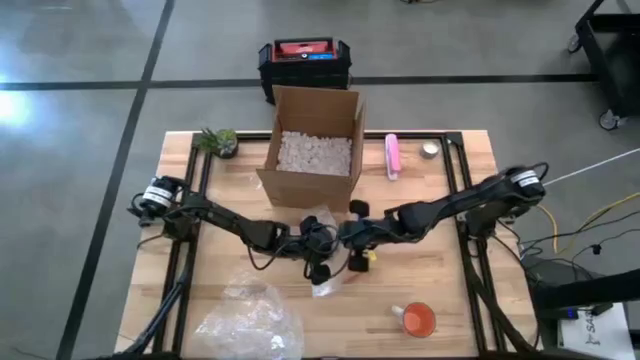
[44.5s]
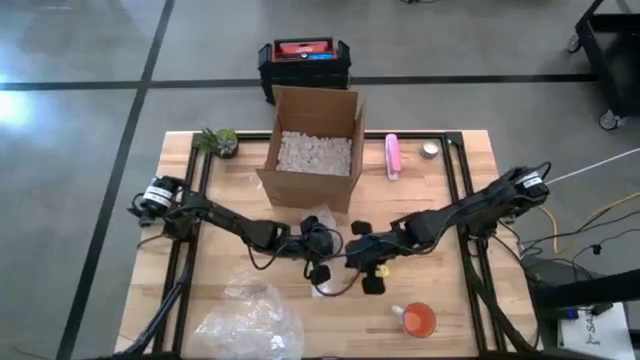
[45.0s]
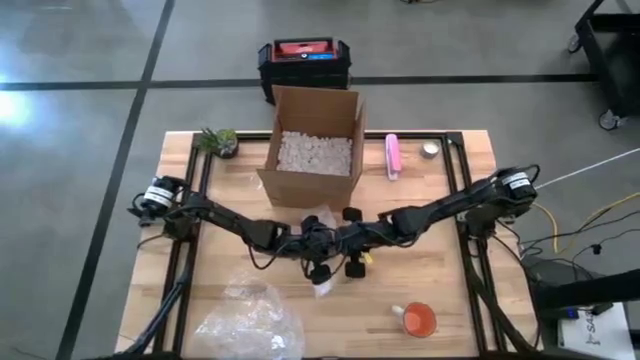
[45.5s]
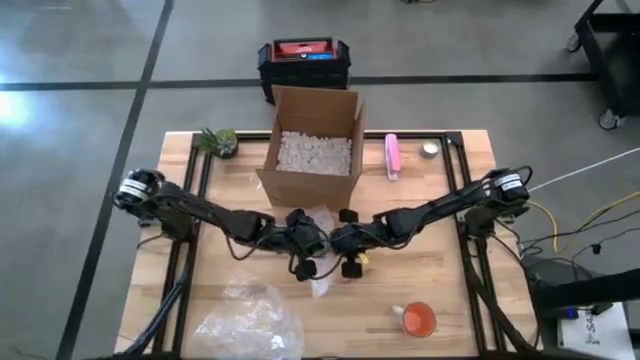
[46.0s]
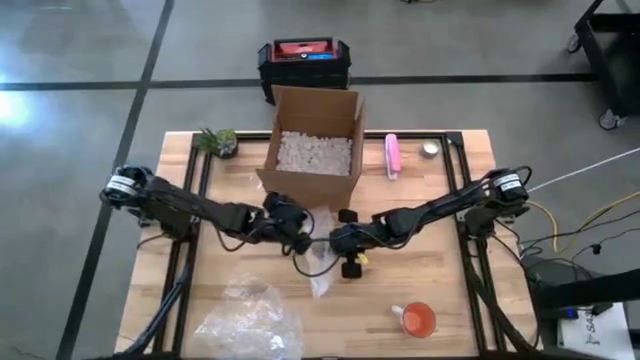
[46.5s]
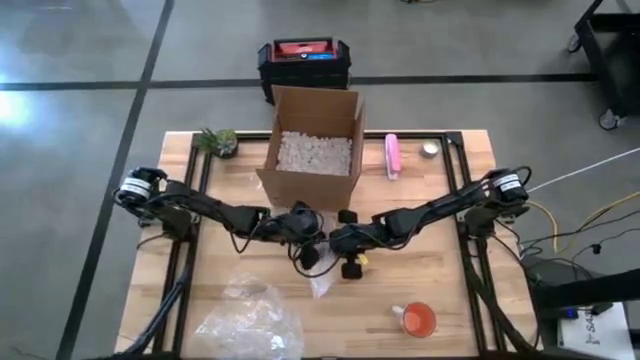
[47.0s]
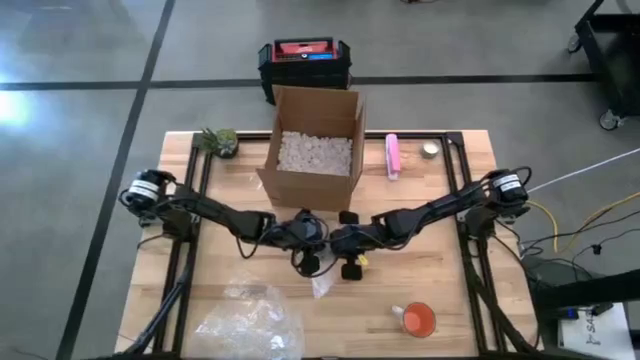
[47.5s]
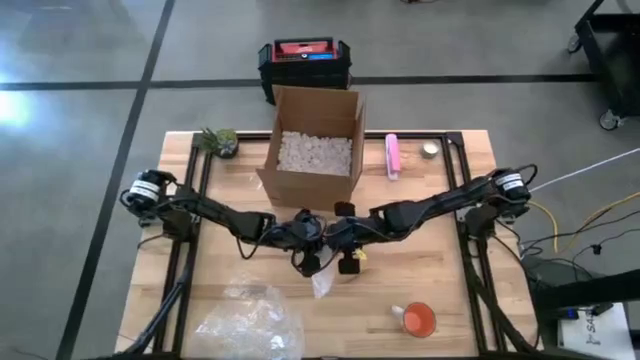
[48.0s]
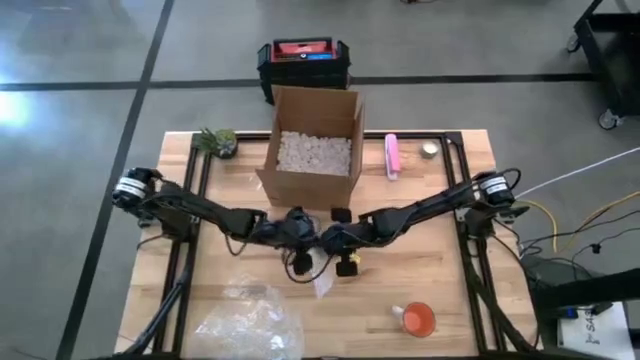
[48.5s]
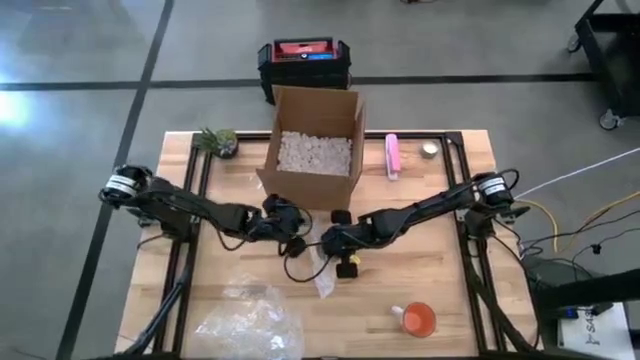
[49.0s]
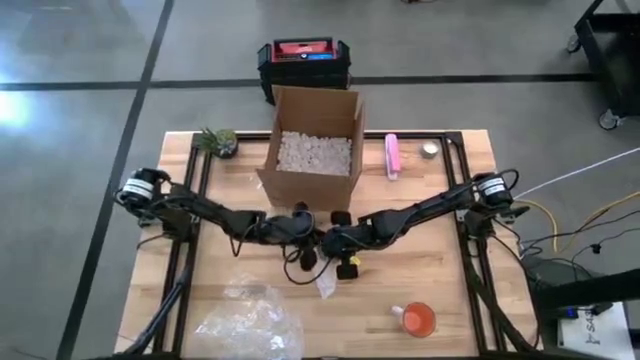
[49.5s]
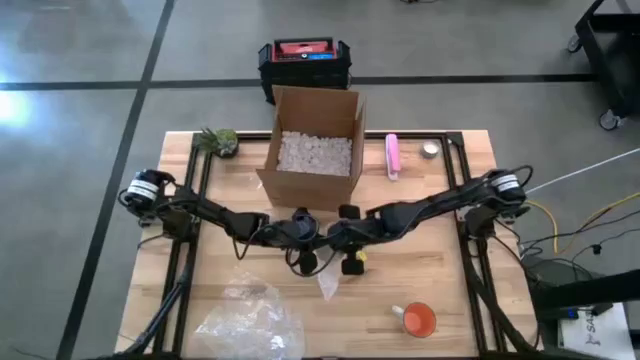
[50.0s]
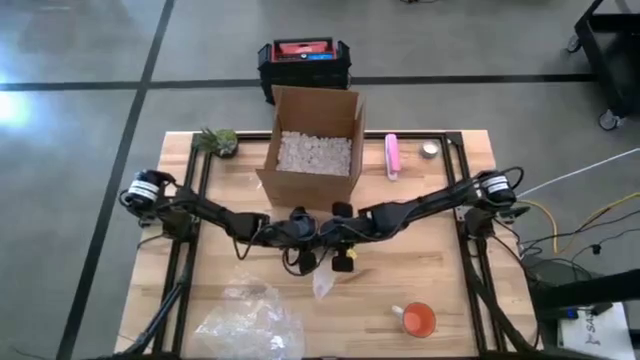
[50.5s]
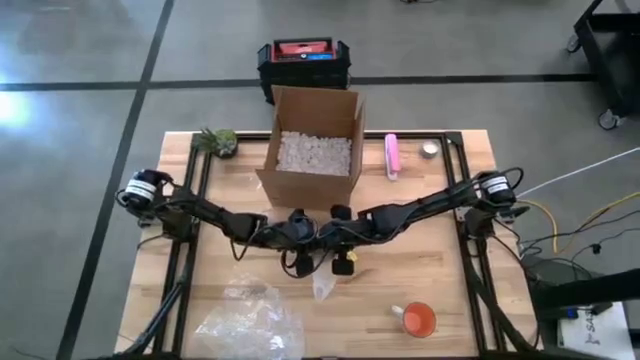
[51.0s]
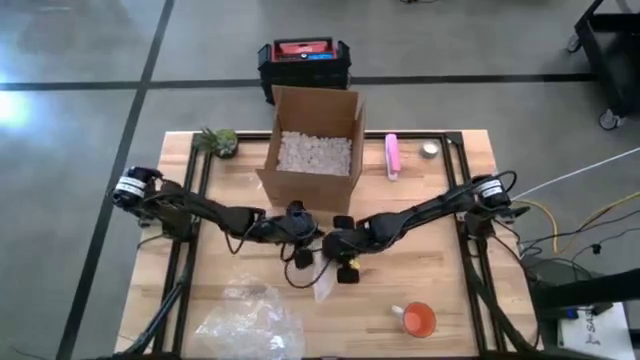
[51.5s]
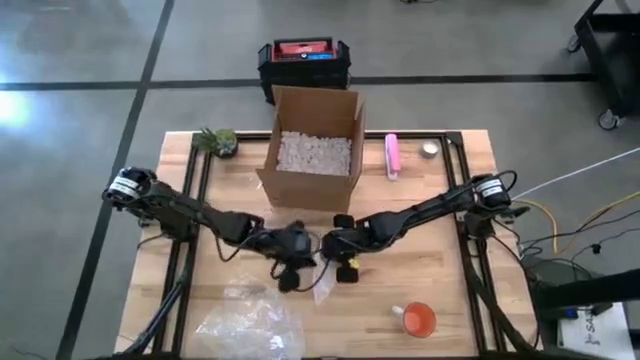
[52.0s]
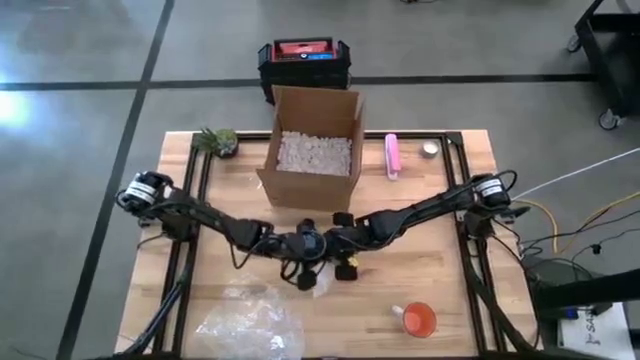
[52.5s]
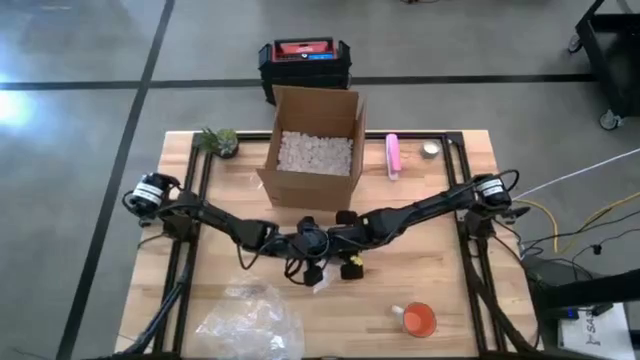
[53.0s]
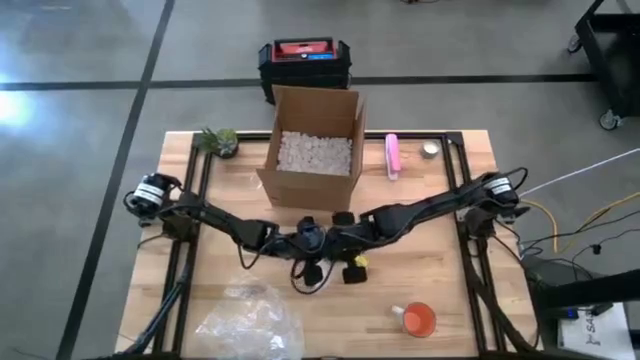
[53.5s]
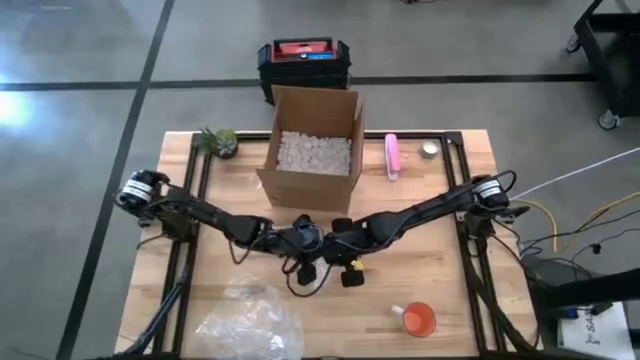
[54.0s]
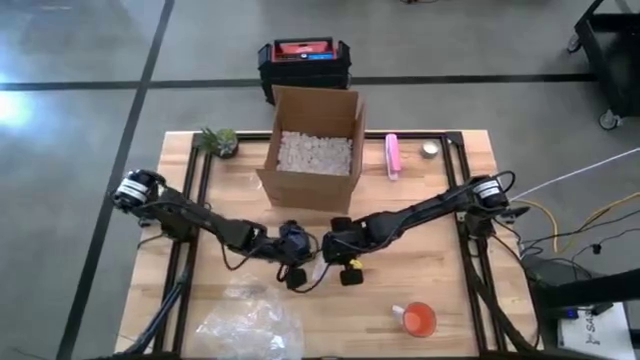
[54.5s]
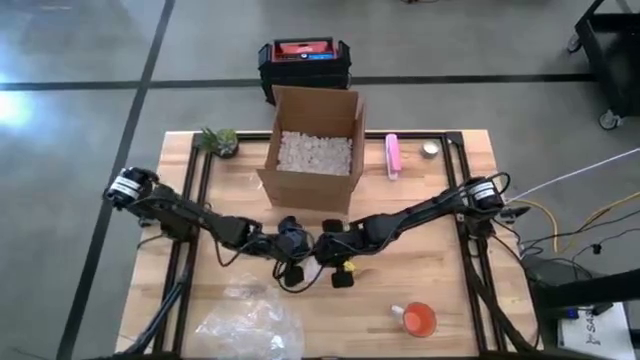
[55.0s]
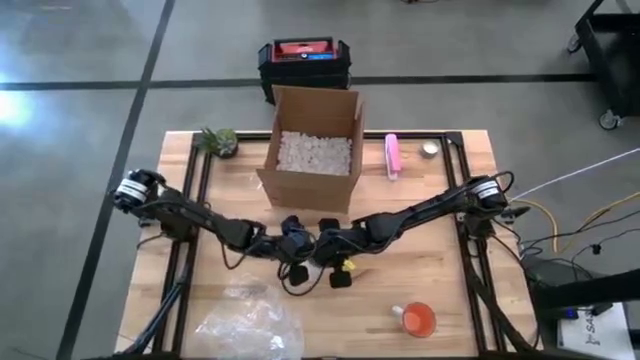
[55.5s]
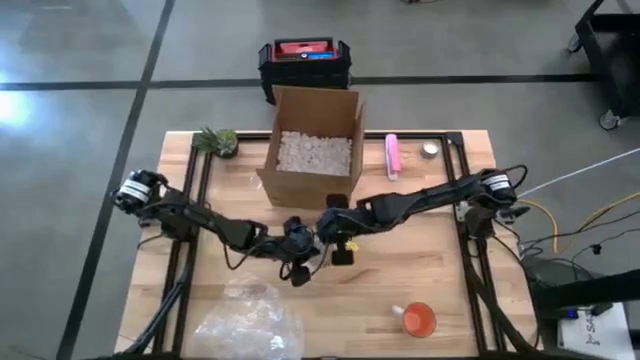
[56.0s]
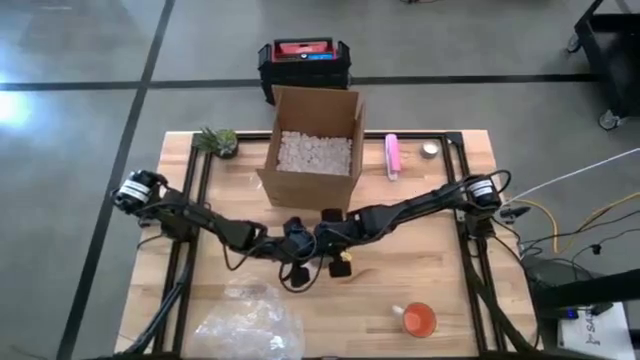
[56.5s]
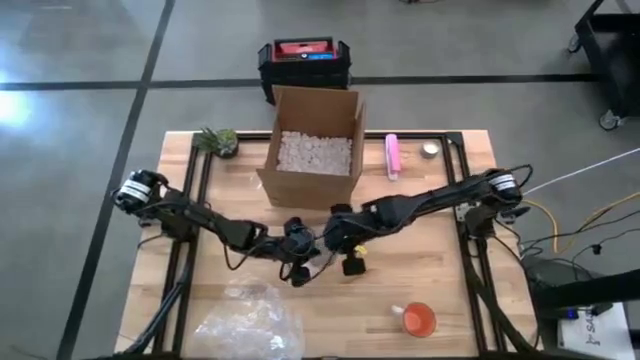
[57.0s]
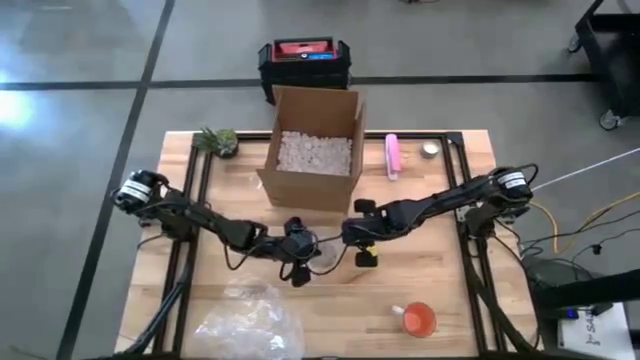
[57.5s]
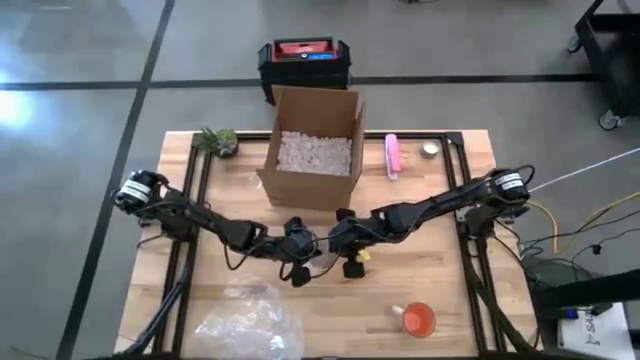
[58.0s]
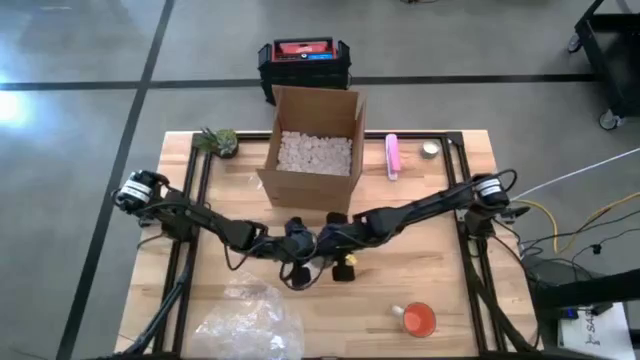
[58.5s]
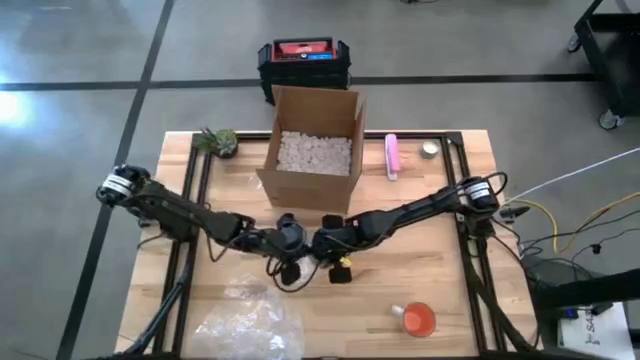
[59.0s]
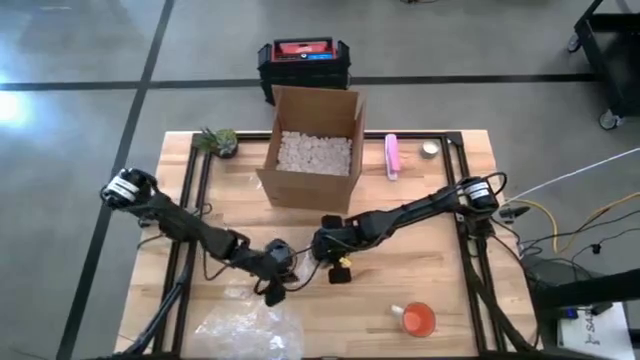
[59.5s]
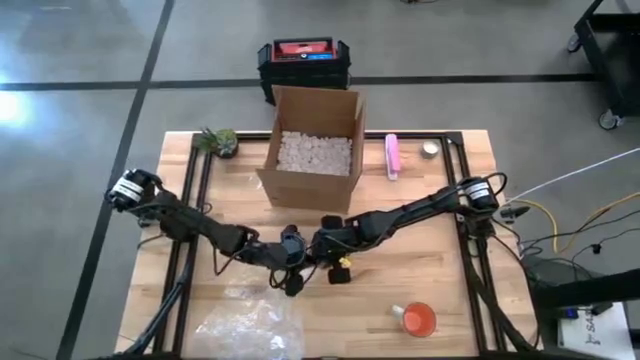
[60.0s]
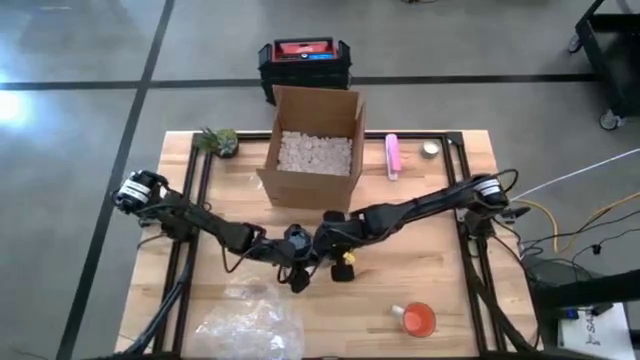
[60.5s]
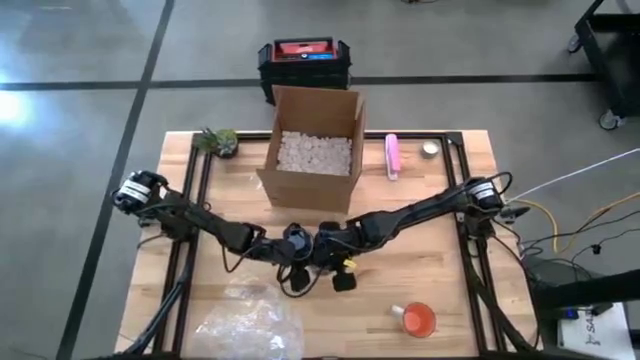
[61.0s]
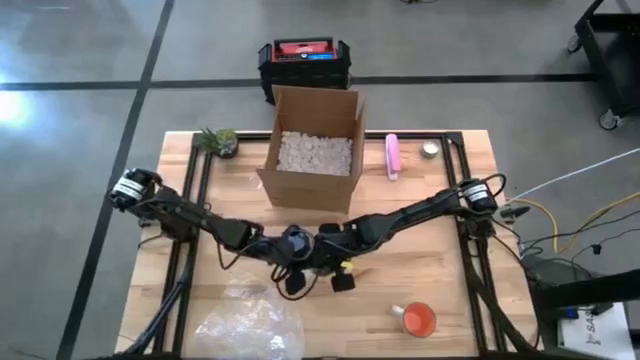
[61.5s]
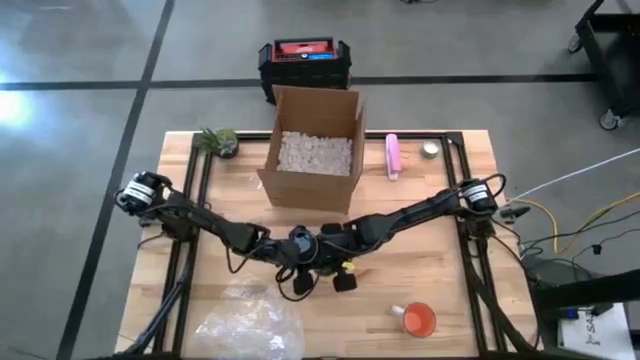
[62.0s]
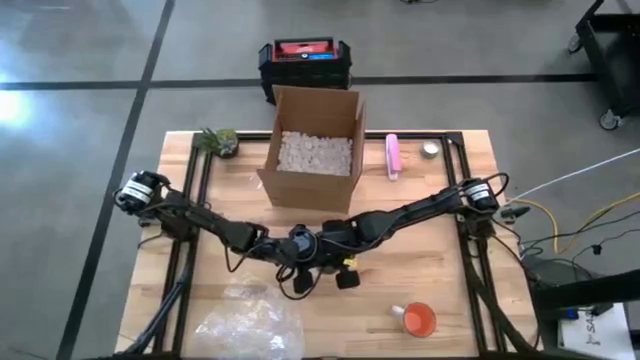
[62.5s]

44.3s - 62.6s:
Task: wrap mug
Wrap the yellow mug with transparent bubble wrap

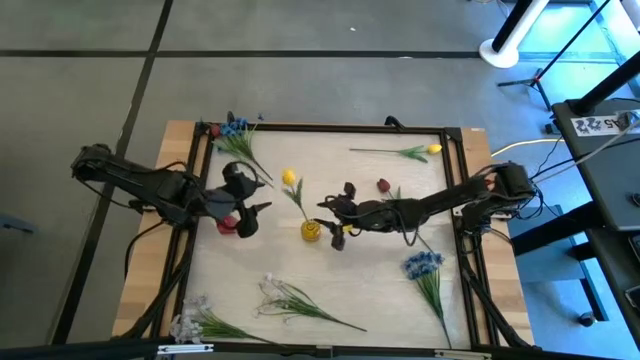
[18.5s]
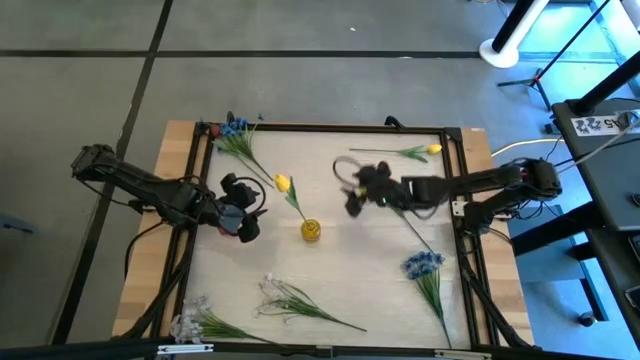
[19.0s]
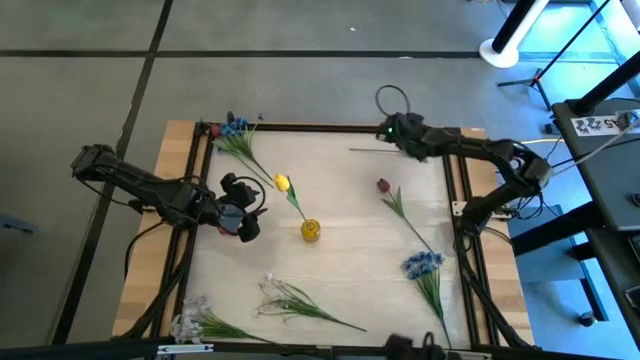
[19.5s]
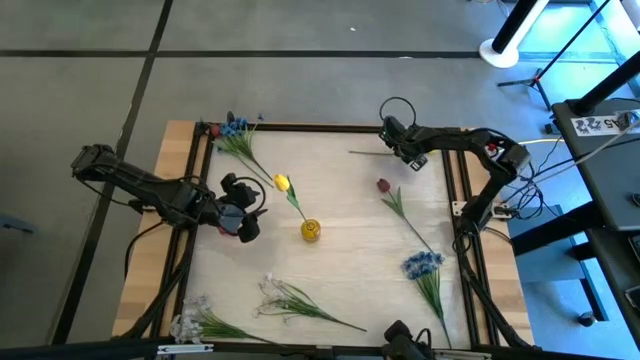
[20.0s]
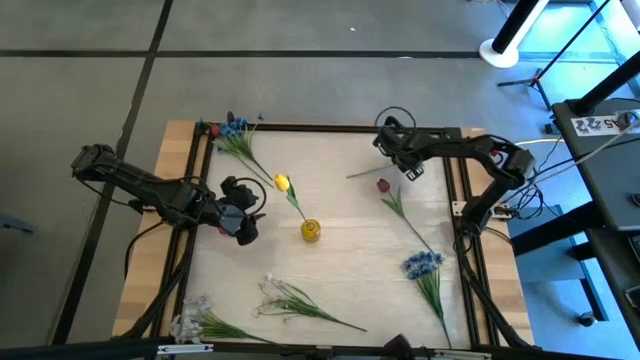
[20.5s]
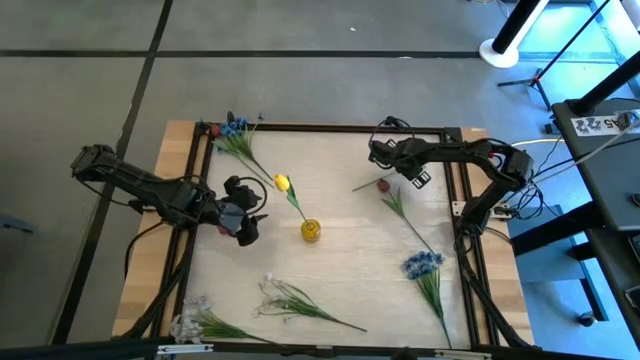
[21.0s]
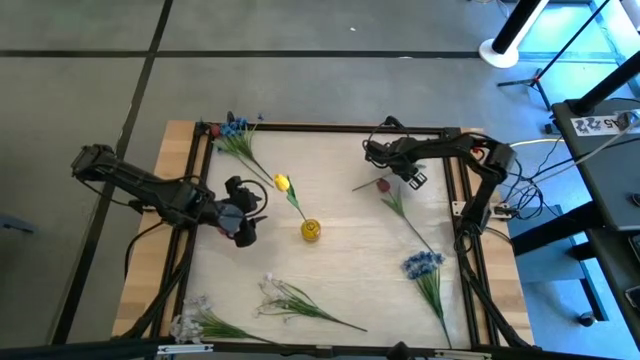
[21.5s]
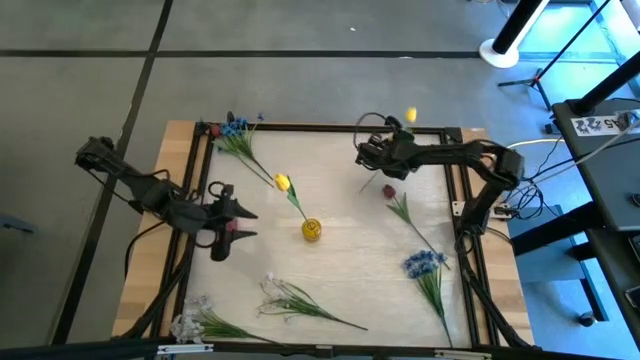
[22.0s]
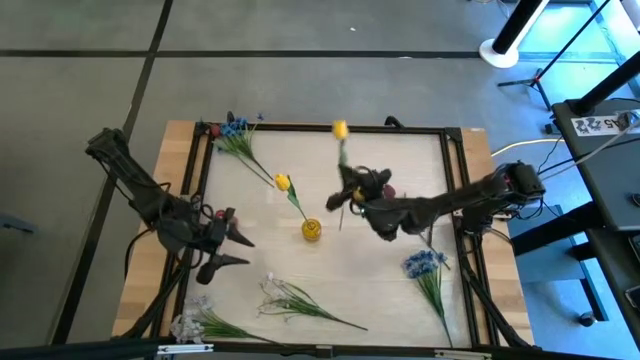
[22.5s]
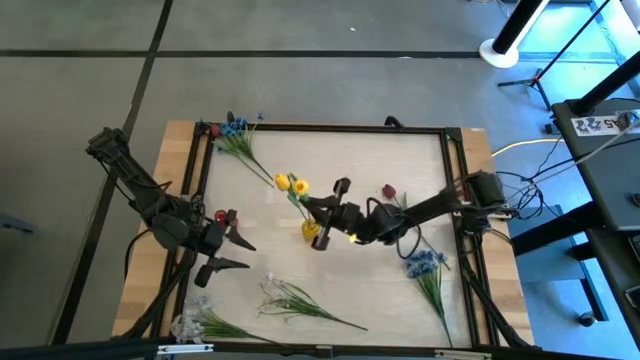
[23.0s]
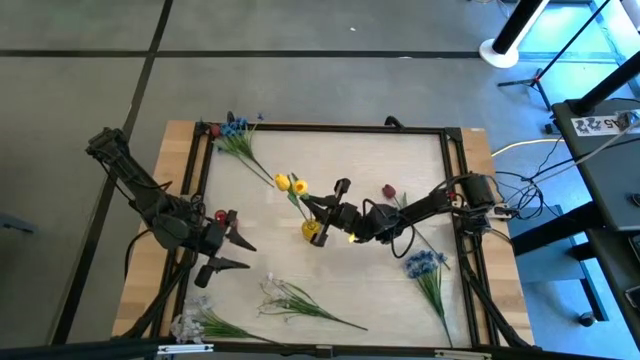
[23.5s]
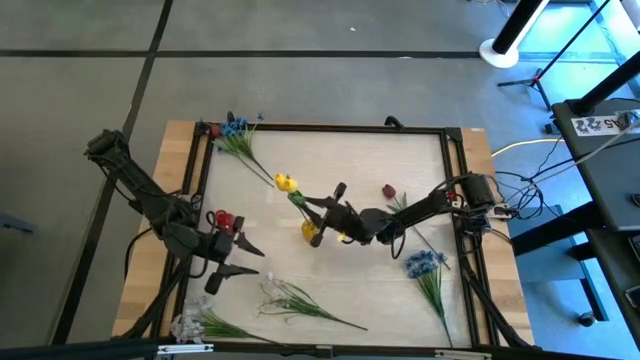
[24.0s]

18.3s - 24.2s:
Task: Sort flowers into vase by color
Put the yellow tulip into the yellow flower vase
